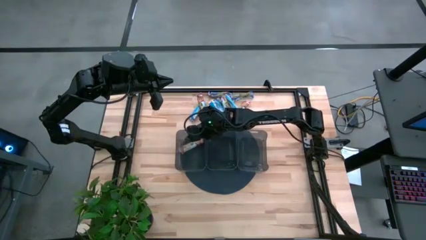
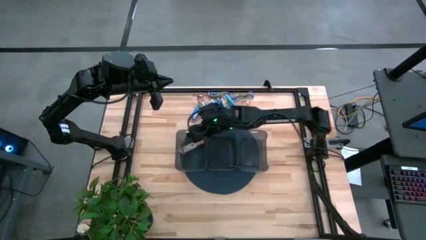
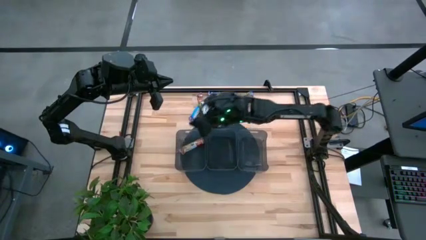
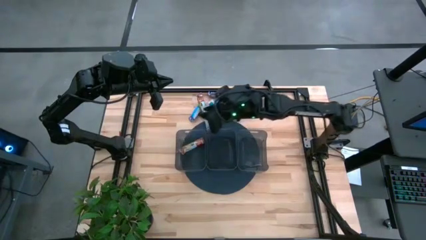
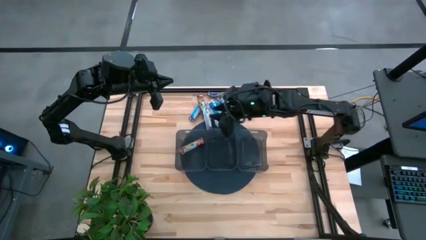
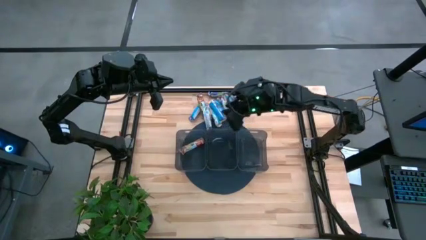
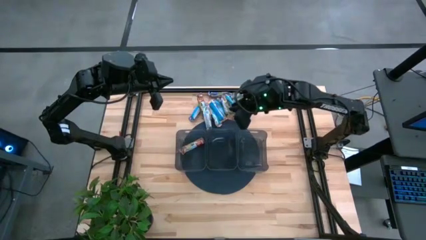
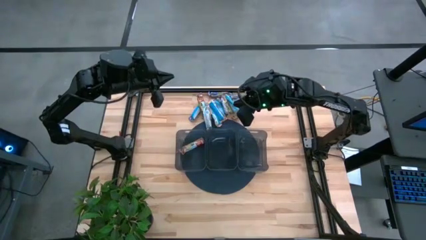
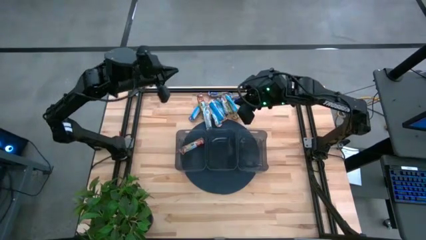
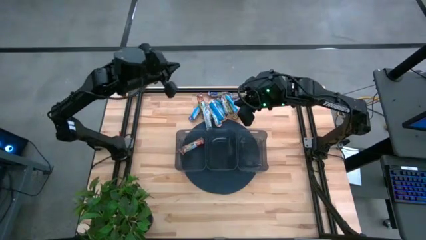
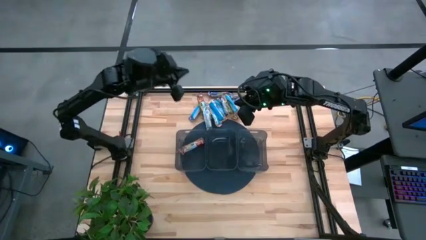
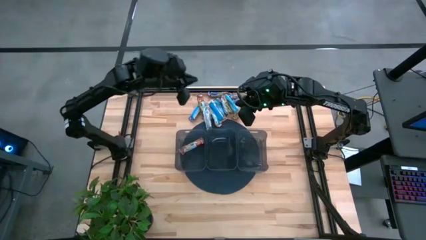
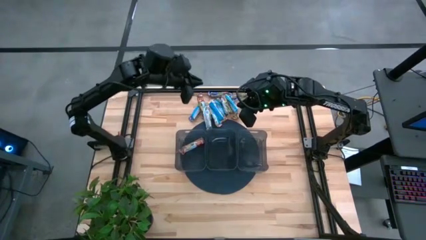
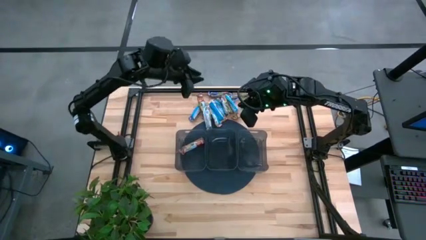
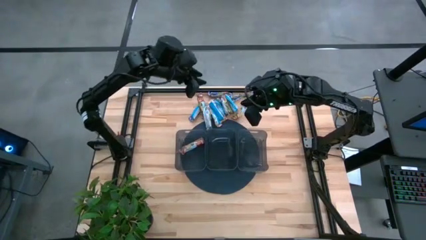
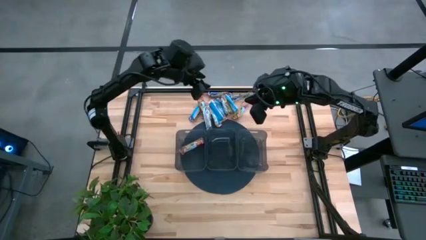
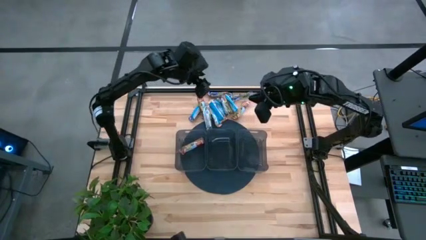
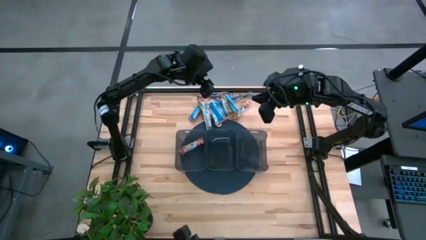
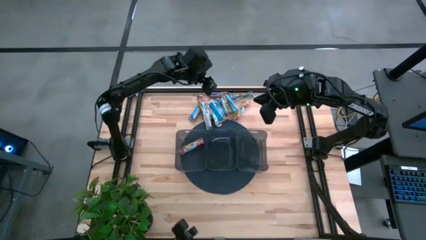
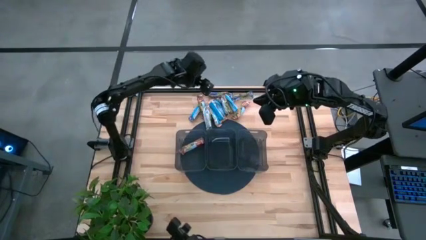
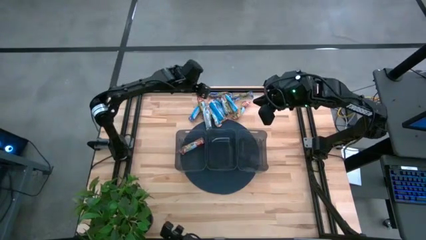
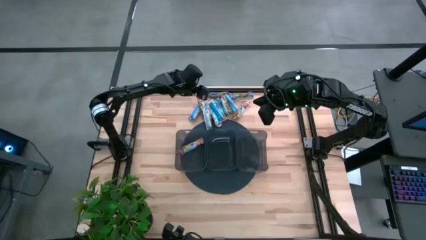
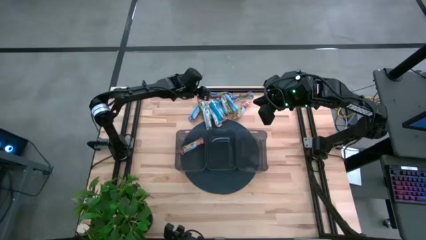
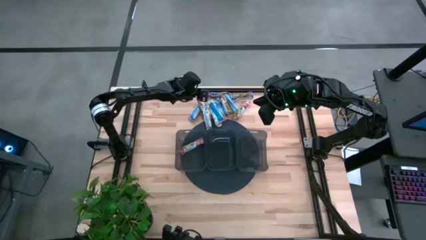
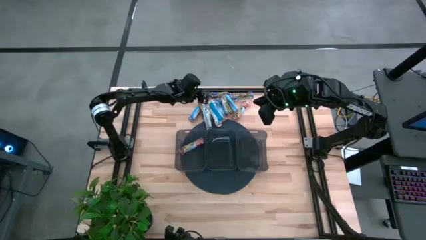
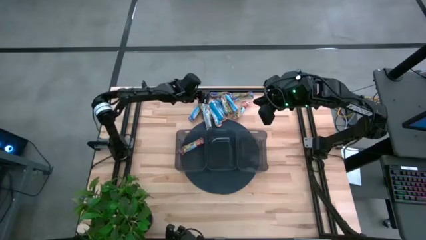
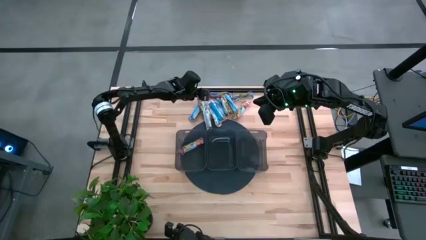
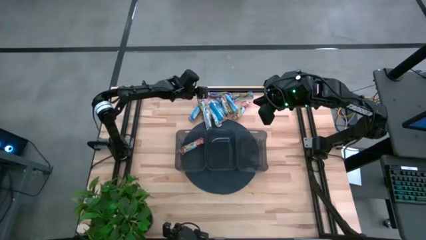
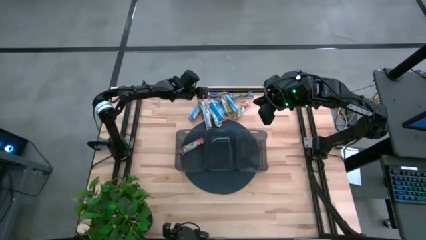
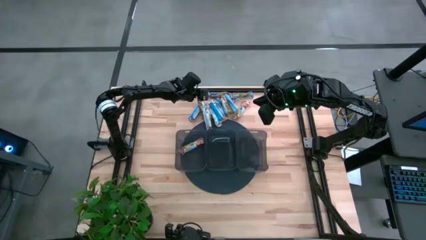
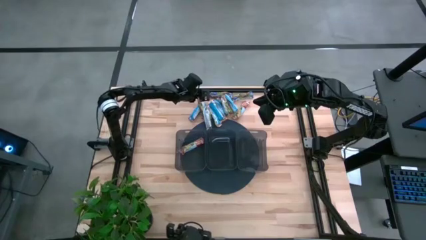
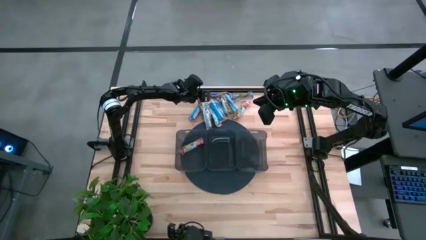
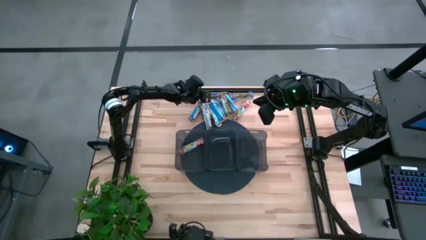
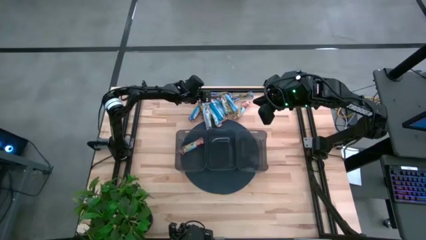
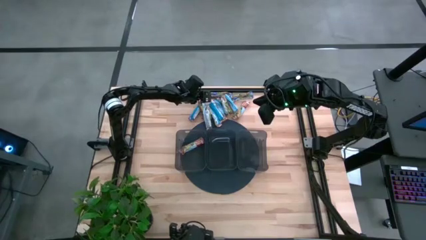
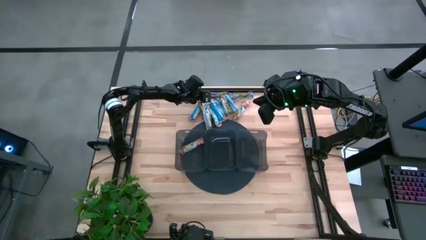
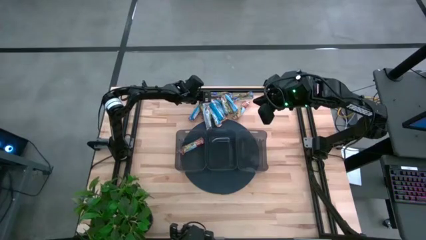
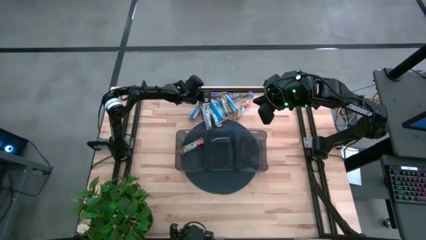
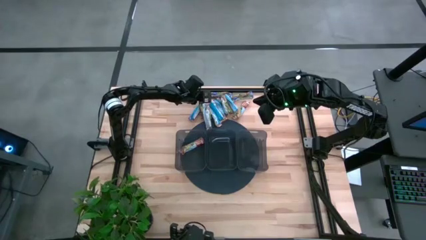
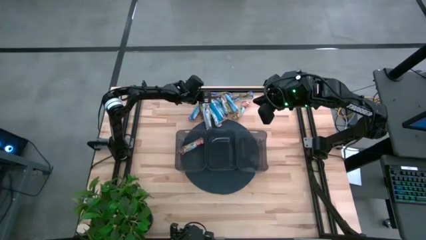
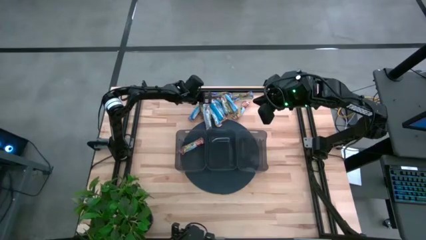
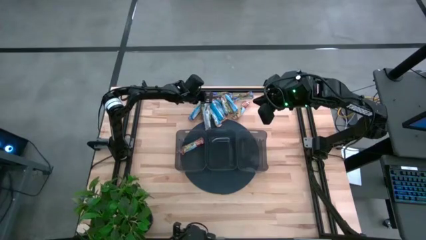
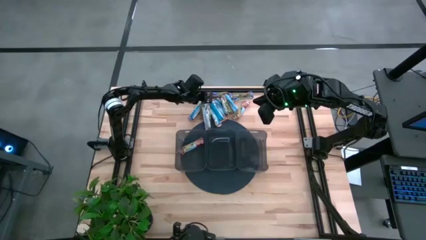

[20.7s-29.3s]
Task: Pick and place Granola Bars by type
Put the red granola bar into the left black bin

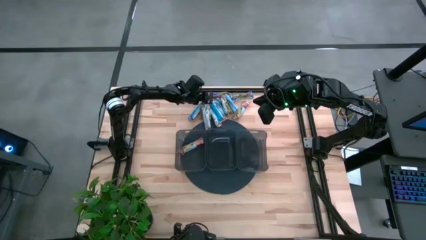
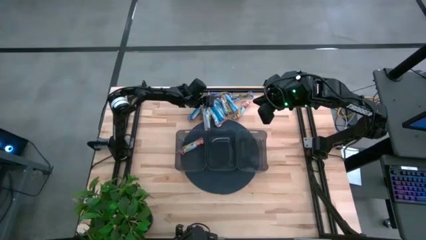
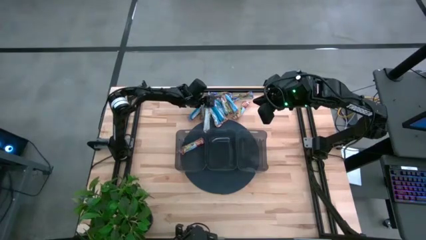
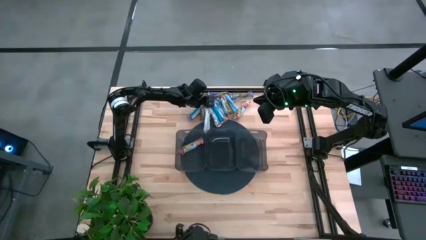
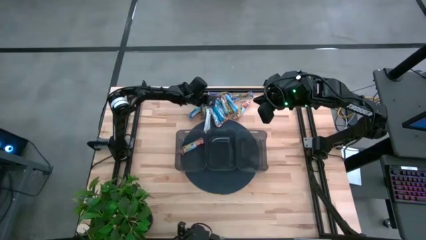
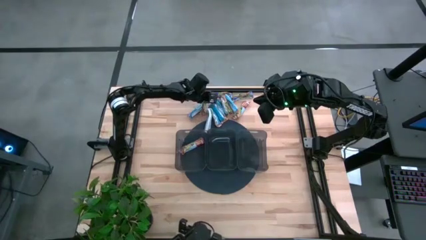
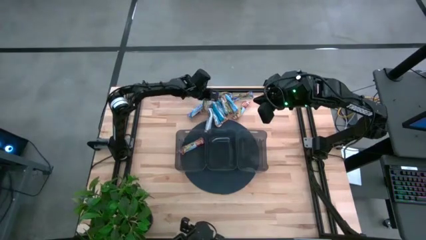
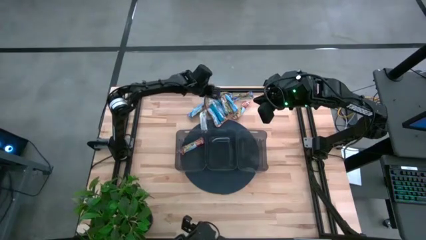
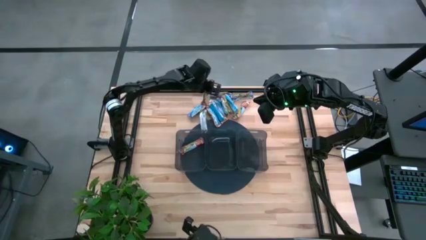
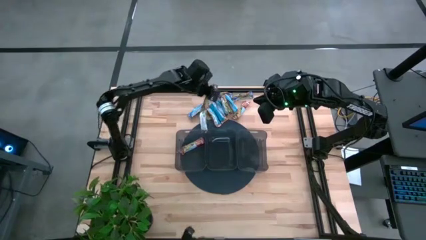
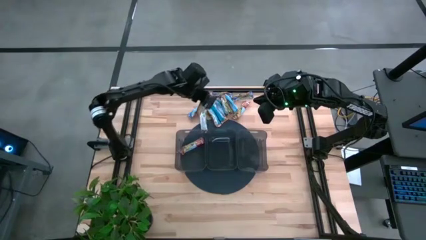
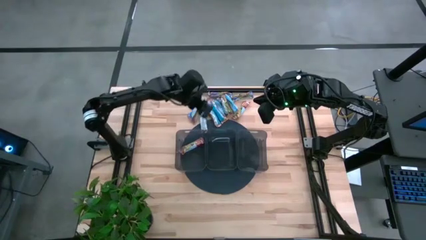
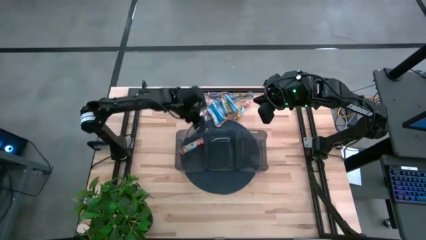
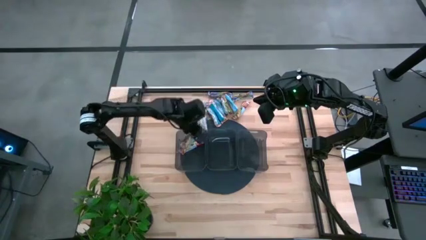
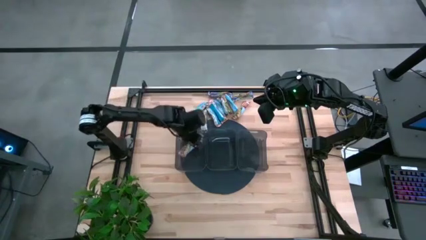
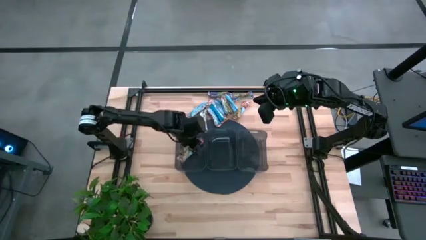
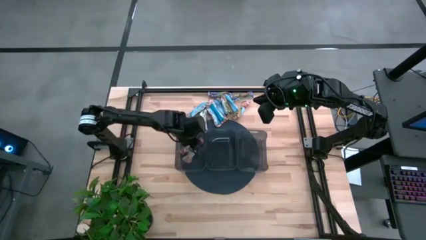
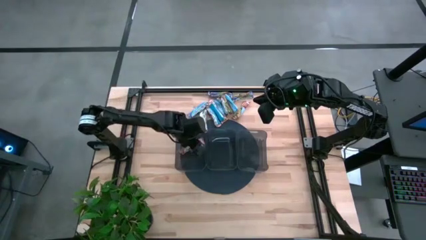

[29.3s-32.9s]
Put the red granola bar into the left black bin
